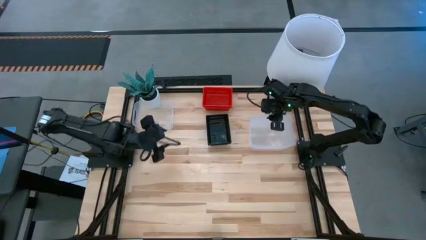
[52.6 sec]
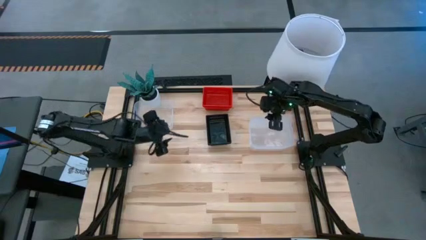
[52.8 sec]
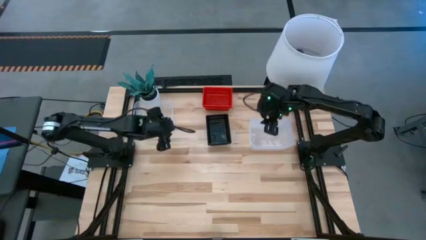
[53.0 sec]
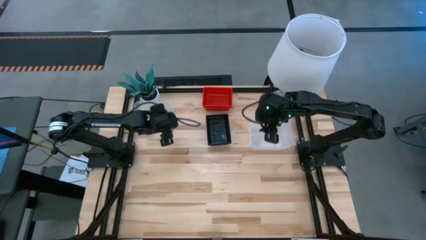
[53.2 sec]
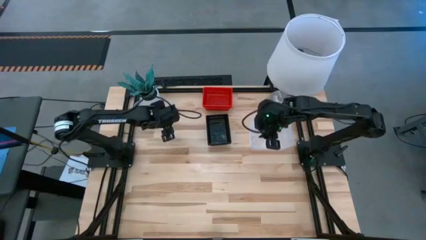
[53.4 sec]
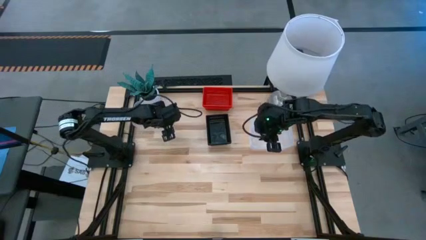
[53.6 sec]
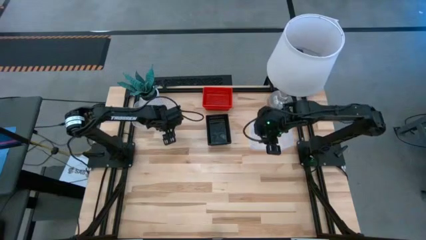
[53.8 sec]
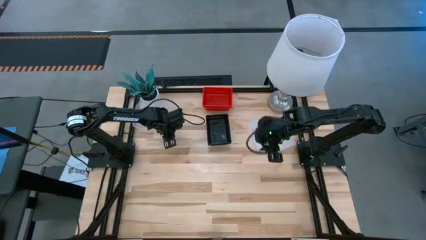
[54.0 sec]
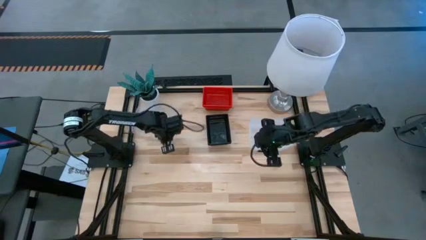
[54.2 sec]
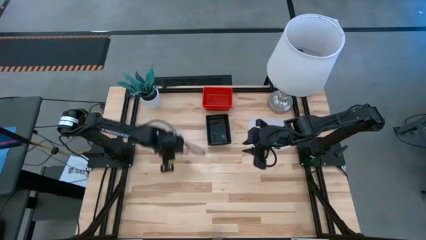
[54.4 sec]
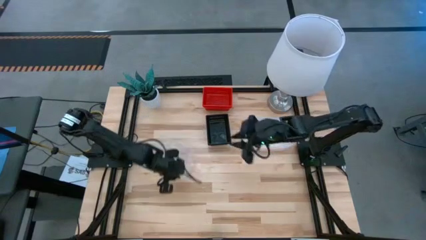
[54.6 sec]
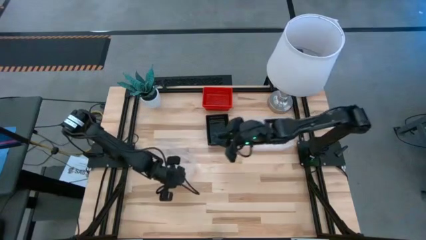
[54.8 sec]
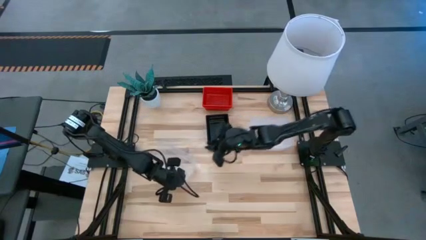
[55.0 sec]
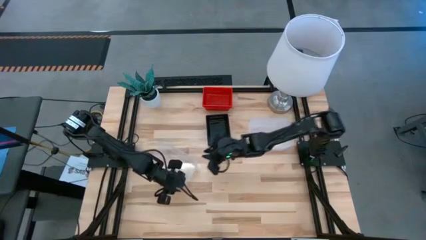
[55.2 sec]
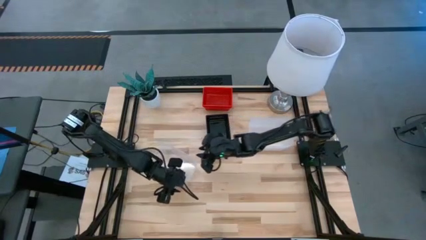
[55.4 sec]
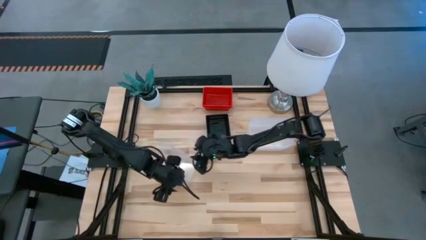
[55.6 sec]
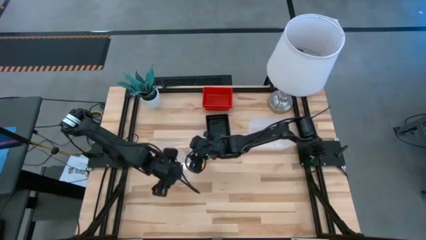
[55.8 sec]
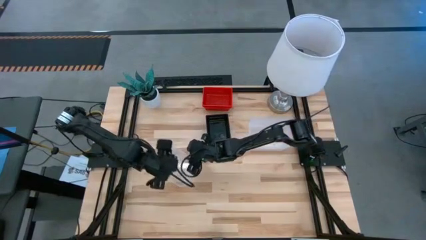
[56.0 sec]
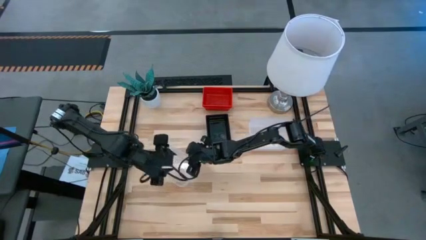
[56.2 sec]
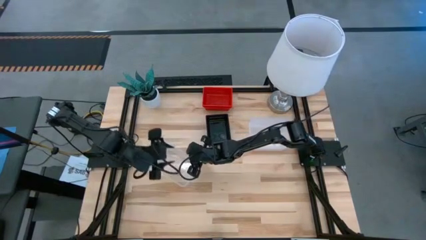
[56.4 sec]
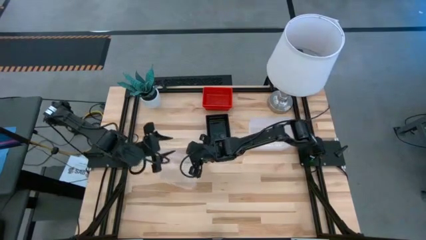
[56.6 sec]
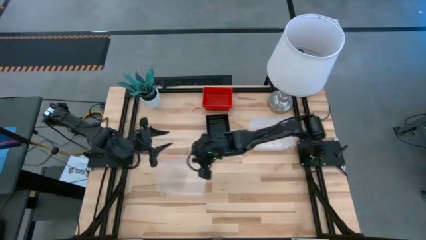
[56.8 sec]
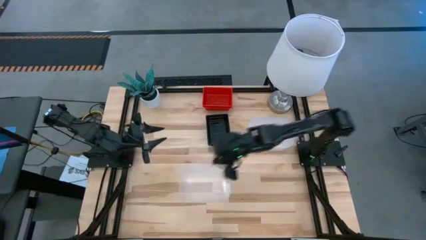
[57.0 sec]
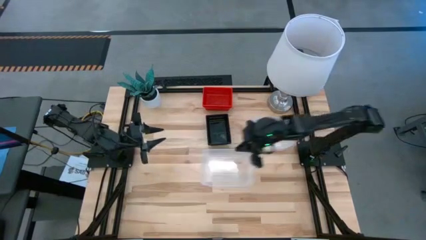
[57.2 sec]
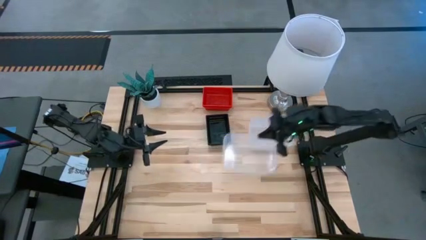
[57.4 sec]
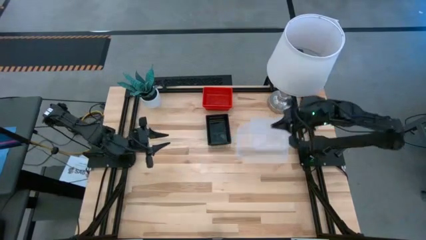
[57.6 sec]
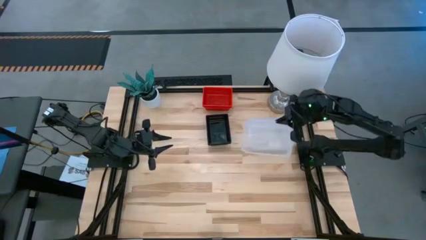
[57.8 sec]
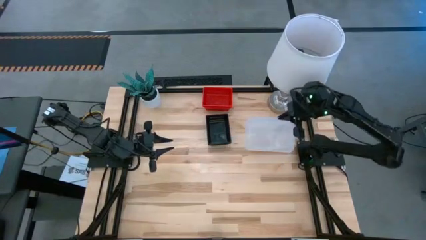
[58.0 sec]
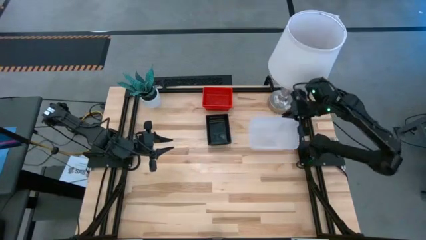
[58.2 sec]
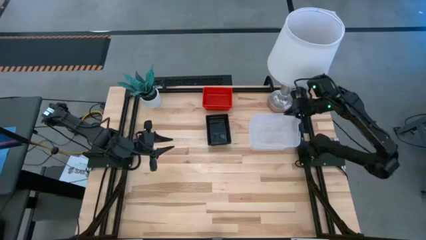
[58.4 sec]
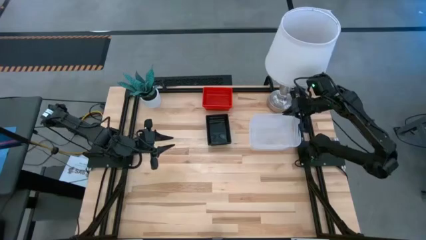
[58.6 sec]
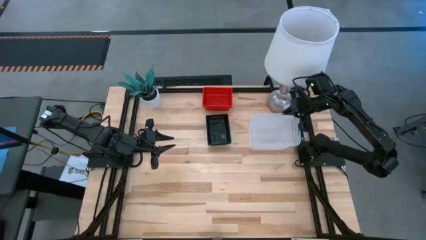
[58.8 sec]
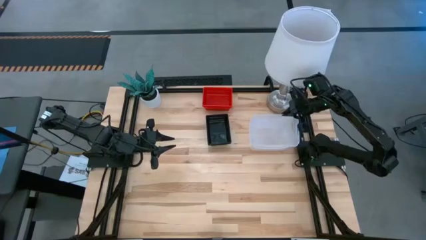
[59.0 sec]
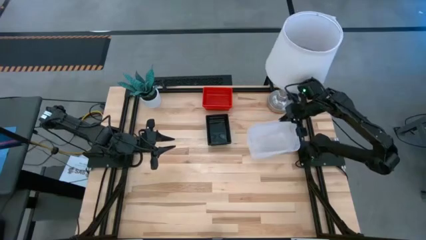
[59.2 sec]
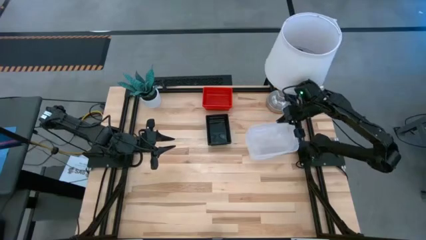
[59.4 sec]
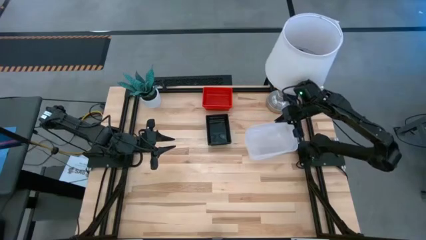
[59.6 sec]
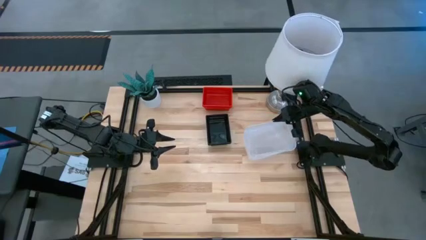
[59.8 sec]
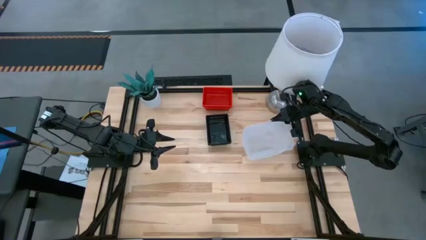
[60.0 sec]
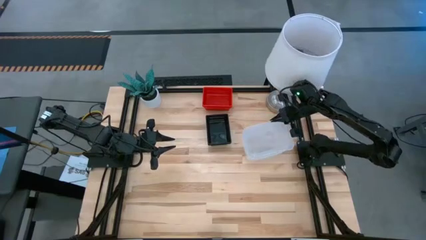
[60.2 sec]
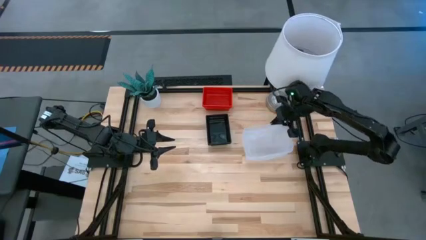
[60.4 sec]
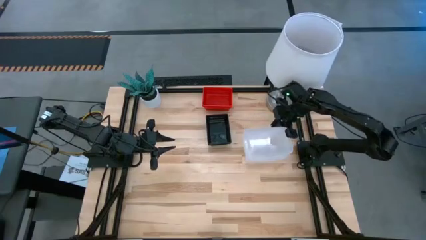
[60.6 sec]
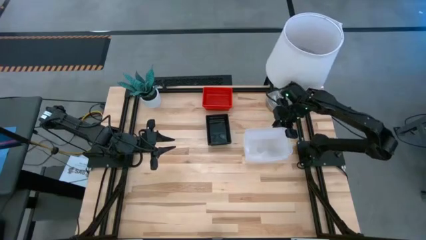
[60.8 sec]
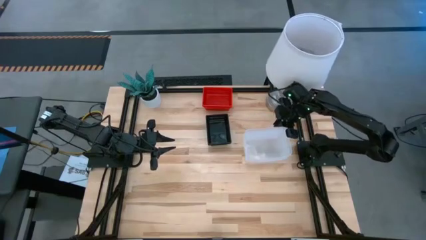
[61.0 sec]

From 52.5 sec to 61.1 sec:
Stack the left transparent bin on top of the right transparent bins

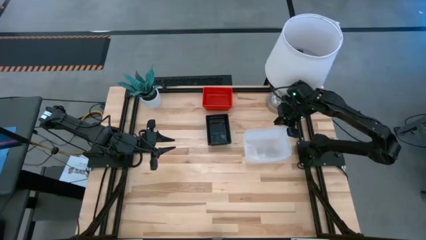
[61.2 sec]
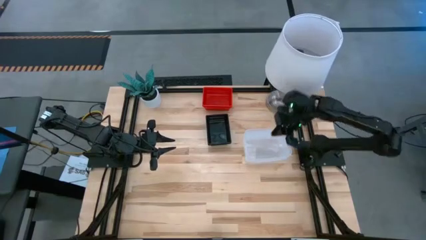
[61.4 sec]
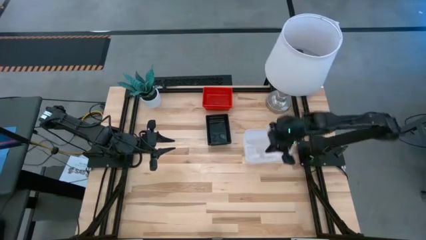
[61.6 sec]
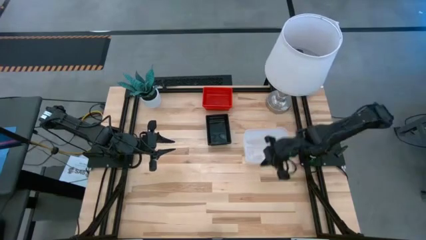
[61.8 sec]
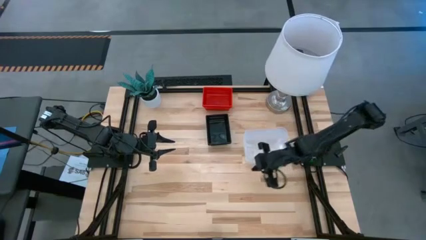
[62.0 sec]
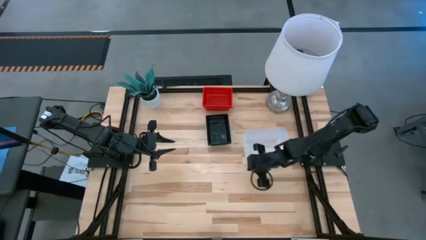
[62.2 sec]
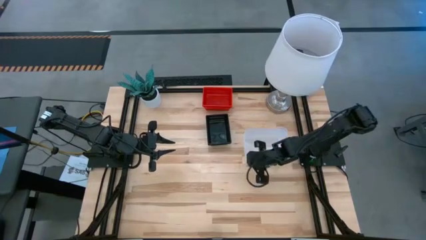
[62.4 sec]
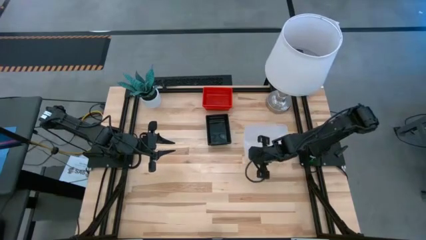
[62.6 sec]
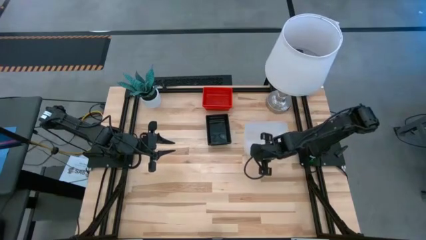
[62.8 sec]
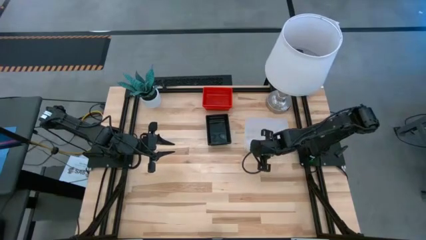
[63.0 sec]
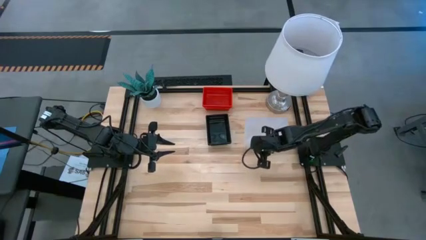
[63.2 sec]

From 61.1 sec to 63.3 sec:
Adjust the transparent bins

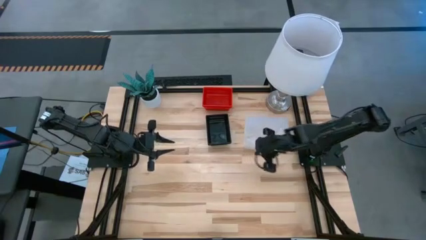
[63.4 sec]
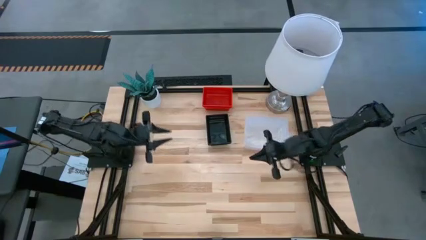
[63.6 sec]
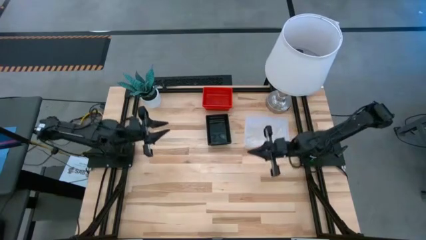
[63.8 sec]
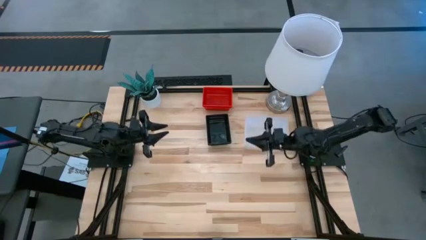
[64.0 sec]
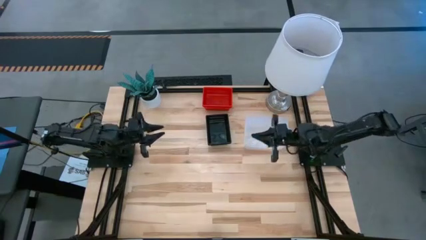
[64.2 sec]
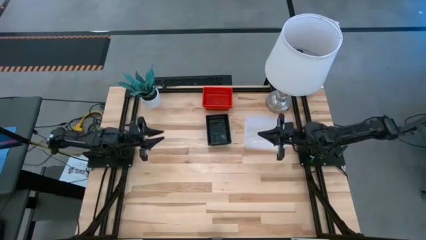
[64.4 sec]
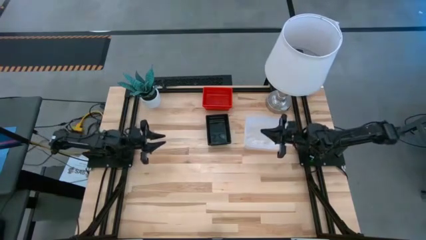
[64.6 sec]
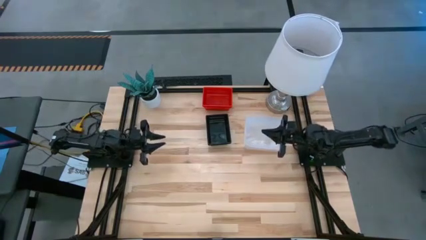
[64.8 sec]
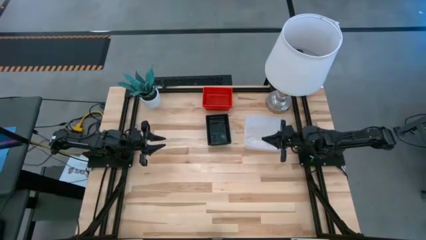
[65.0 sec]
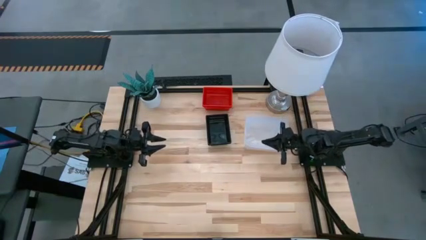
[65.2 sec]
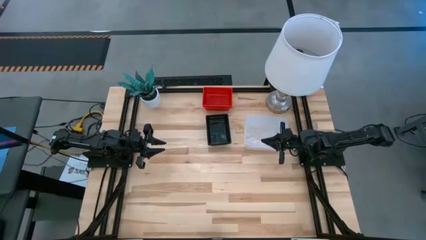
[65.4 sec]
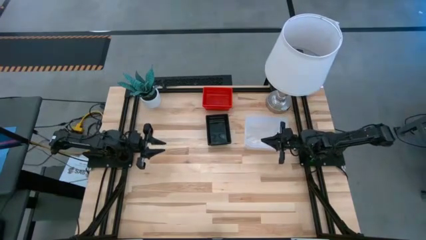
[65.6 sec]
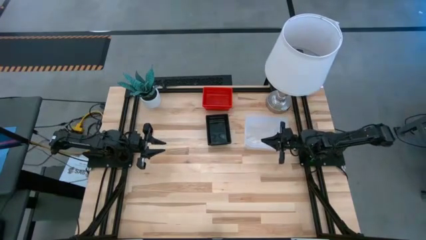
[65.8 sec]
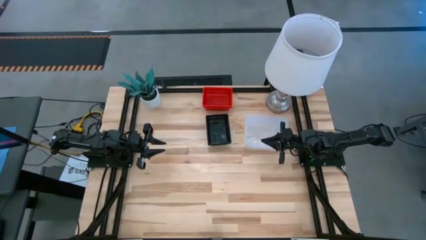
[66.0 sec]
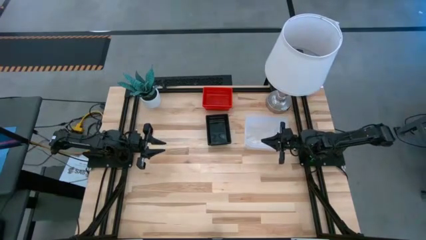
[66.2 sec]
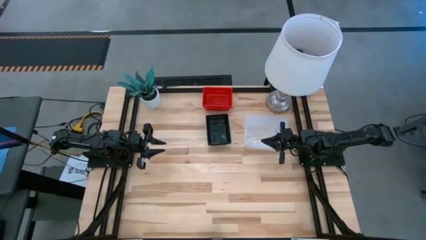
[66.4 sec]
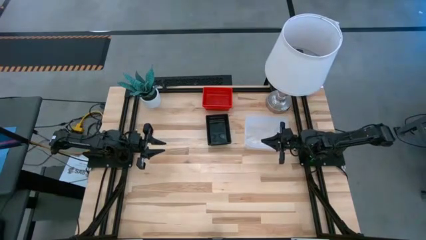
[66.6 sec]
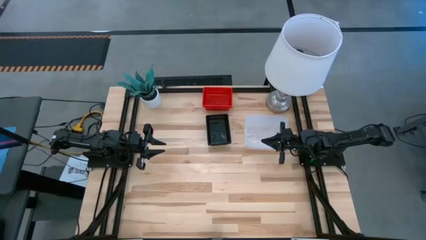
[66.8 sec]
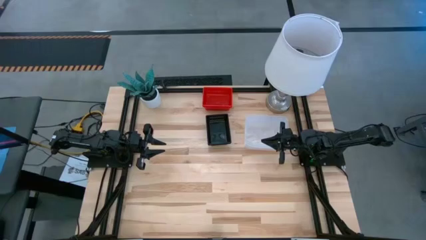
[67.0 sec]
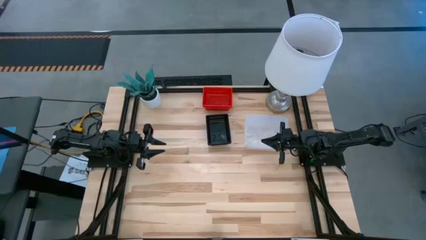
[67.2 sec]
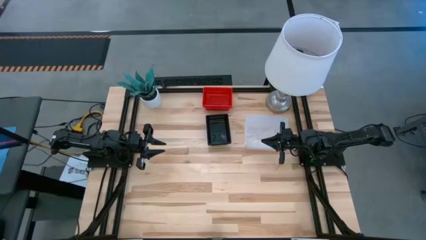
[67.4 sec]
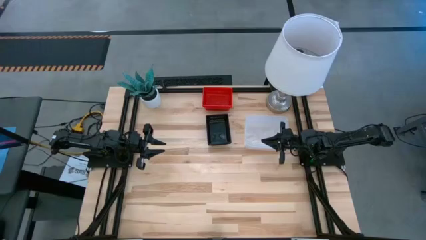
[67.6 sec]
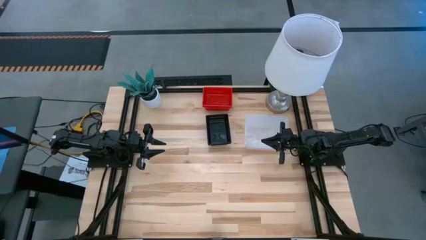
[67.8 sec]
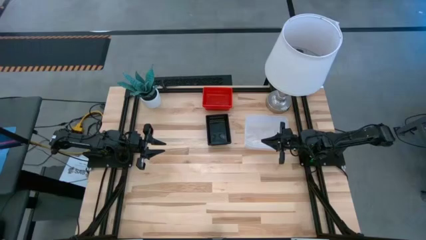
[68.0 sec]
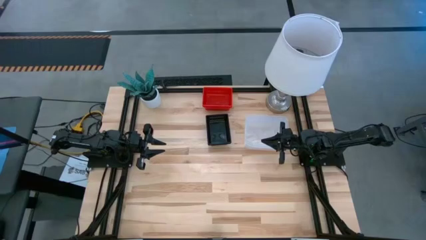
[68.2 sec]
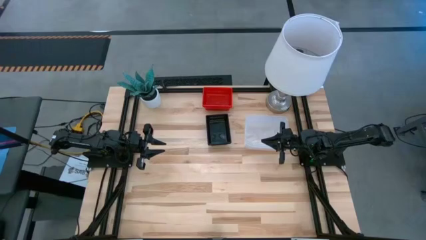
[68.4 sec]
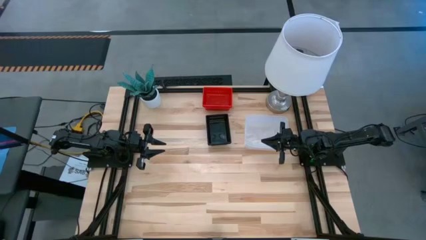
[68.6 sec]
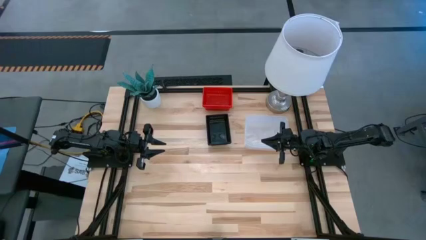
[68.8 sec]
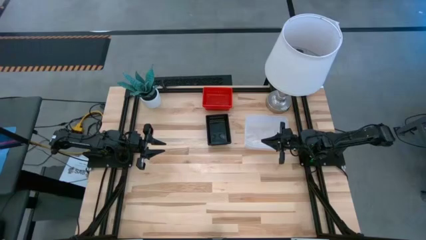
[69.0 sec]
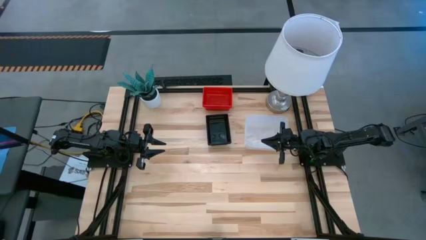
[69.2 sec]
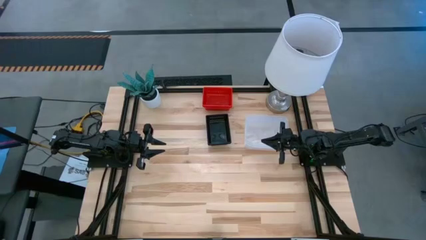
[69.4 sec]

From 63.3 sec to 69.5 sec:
Return to Home Position
